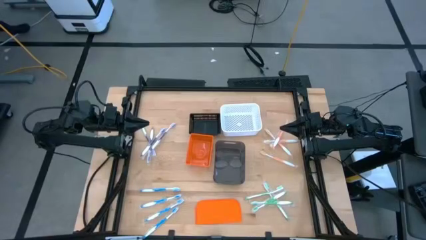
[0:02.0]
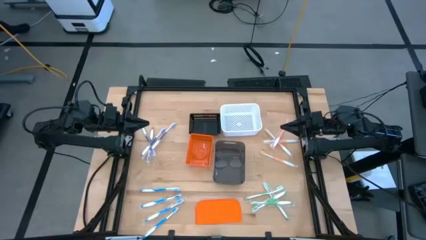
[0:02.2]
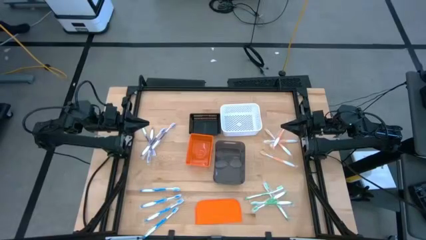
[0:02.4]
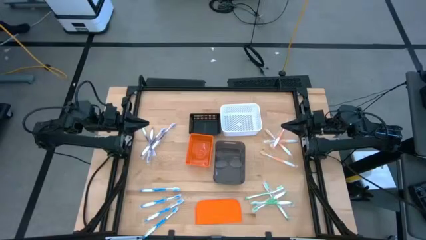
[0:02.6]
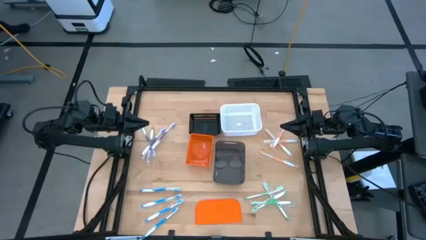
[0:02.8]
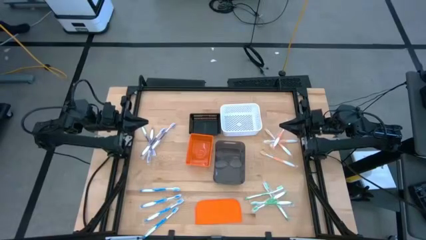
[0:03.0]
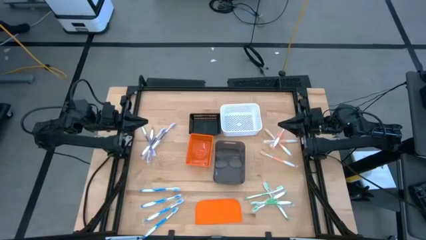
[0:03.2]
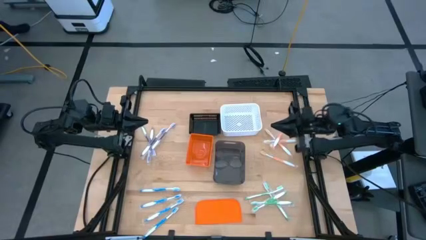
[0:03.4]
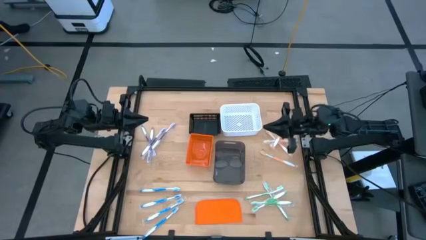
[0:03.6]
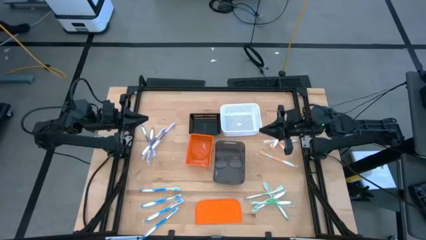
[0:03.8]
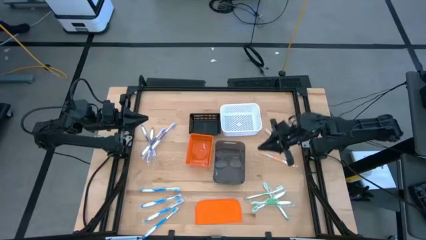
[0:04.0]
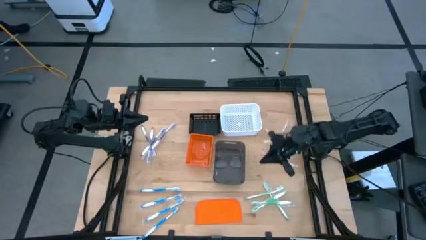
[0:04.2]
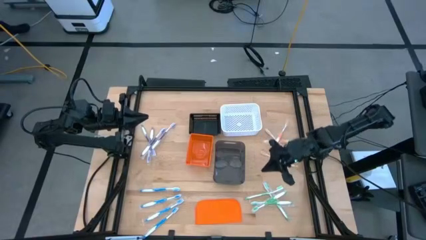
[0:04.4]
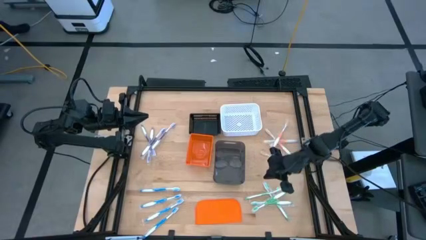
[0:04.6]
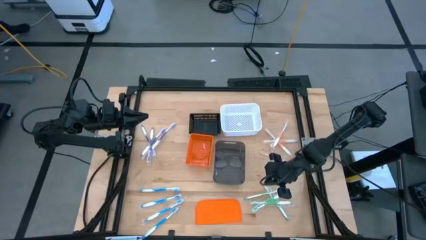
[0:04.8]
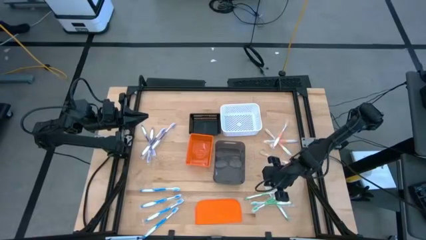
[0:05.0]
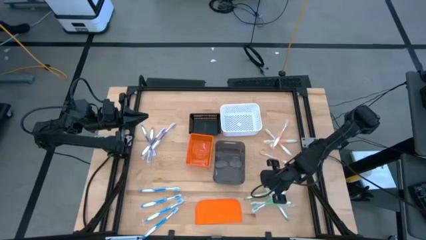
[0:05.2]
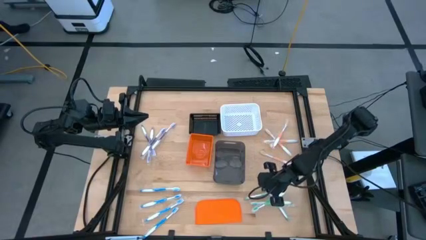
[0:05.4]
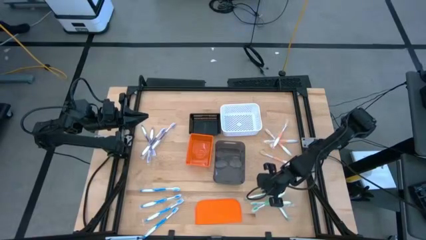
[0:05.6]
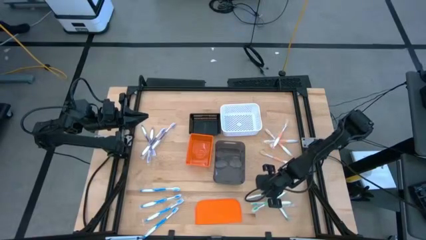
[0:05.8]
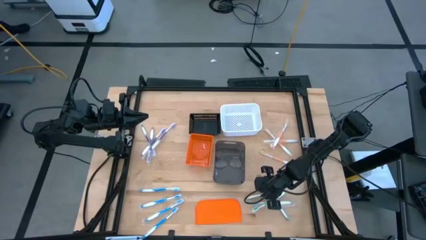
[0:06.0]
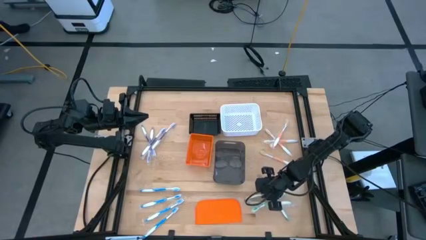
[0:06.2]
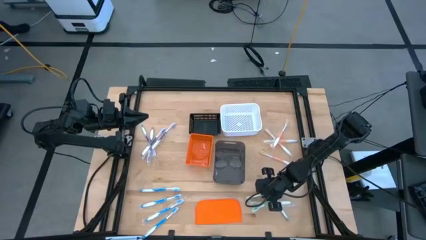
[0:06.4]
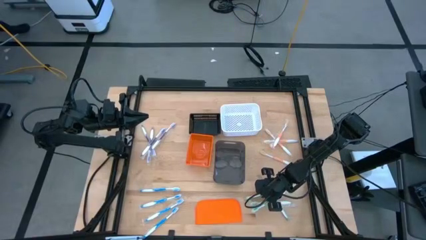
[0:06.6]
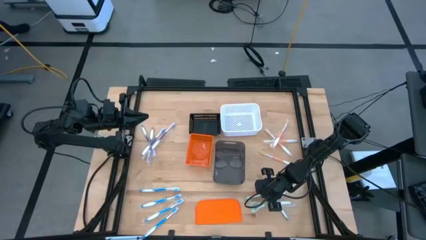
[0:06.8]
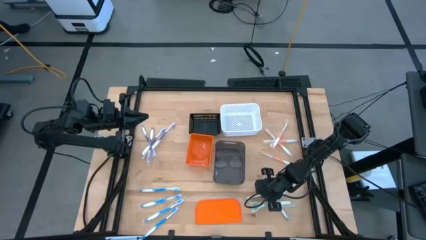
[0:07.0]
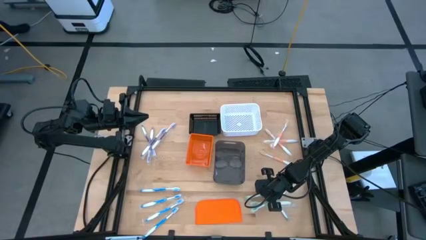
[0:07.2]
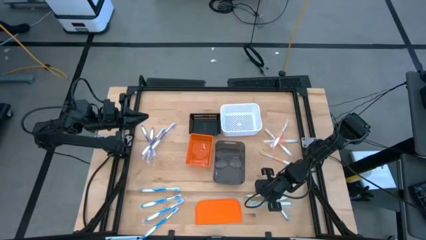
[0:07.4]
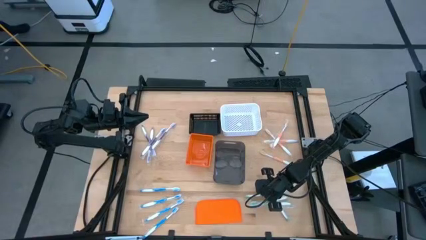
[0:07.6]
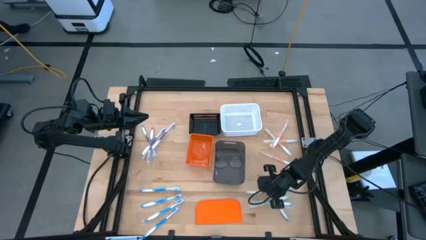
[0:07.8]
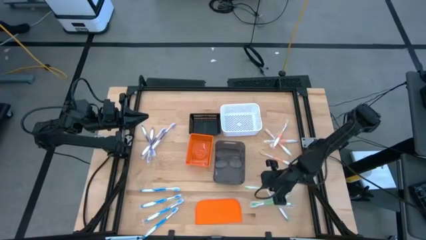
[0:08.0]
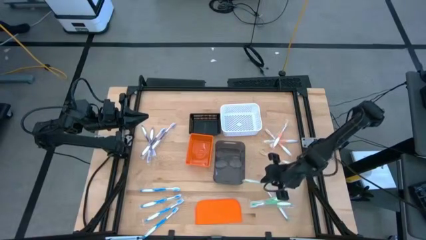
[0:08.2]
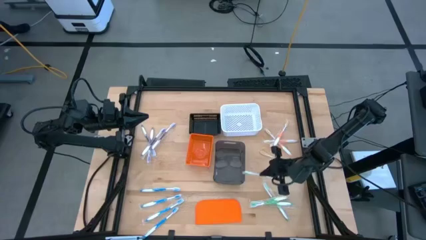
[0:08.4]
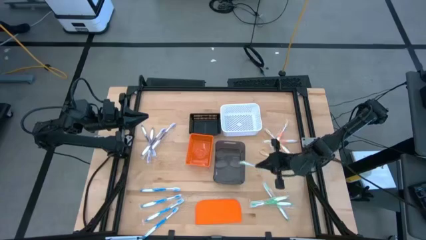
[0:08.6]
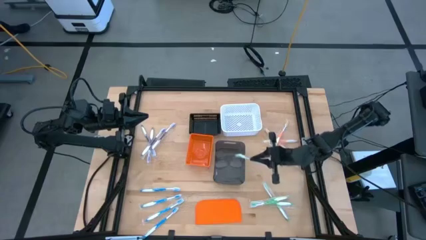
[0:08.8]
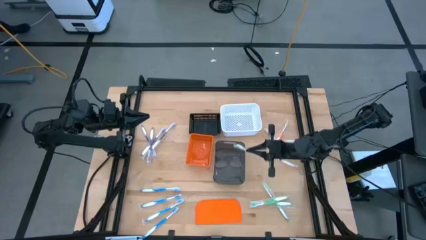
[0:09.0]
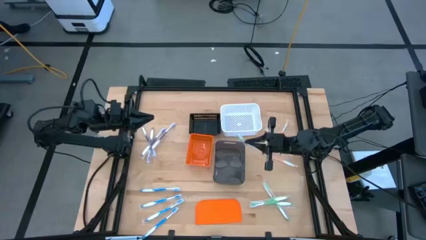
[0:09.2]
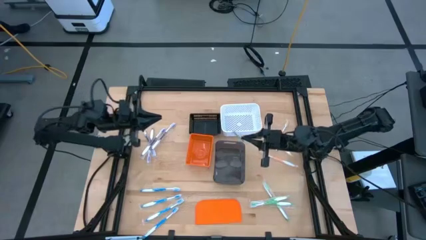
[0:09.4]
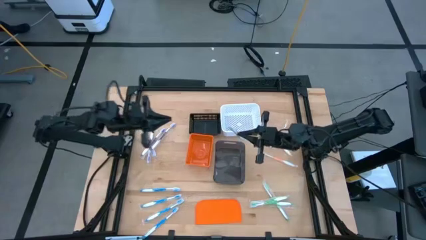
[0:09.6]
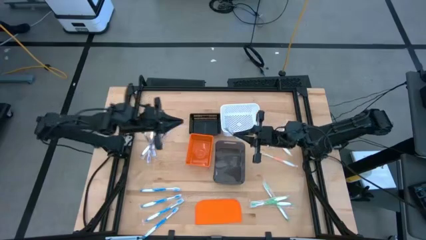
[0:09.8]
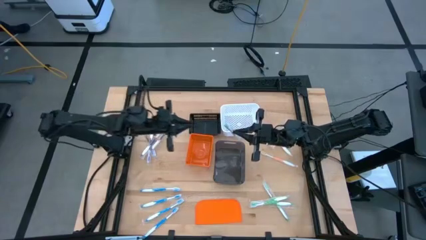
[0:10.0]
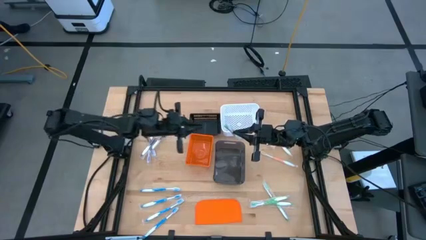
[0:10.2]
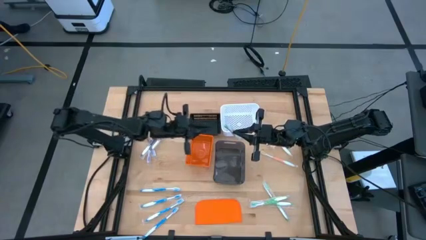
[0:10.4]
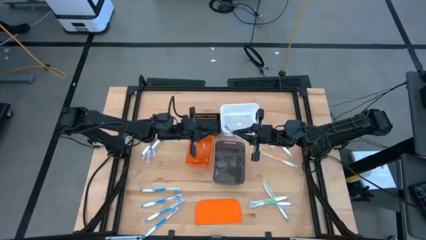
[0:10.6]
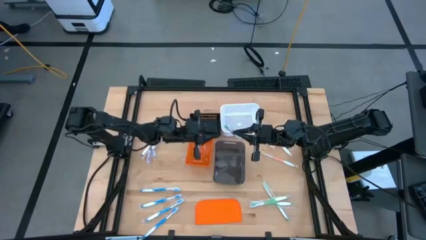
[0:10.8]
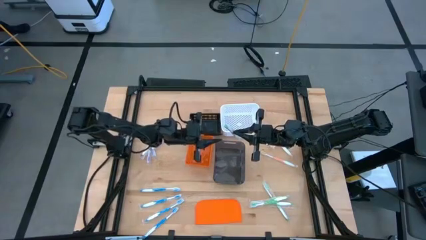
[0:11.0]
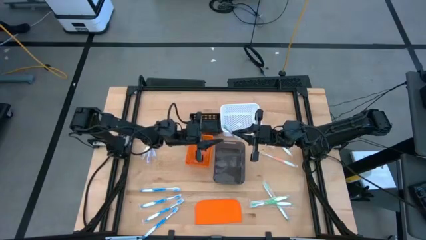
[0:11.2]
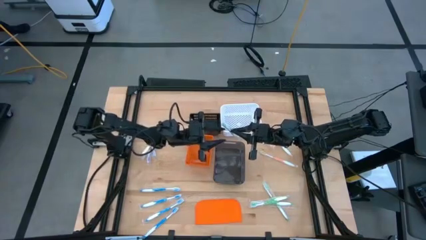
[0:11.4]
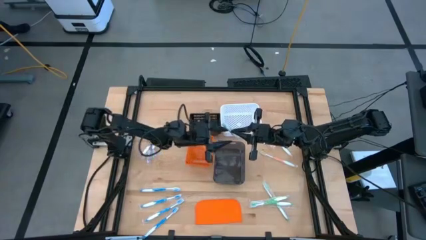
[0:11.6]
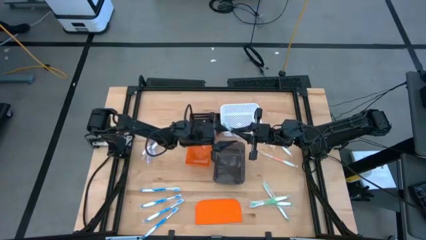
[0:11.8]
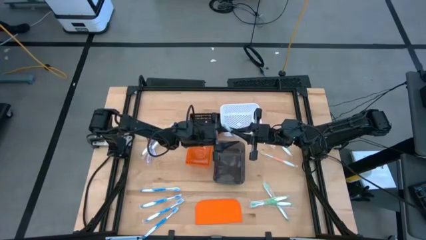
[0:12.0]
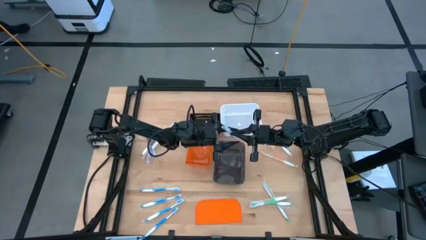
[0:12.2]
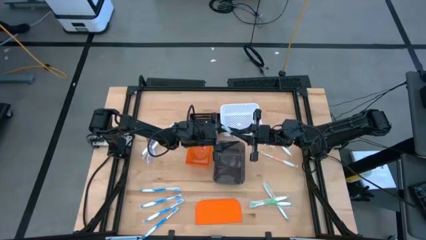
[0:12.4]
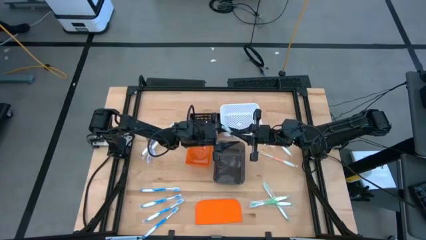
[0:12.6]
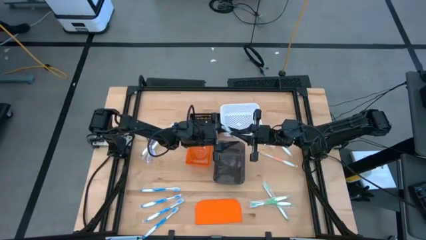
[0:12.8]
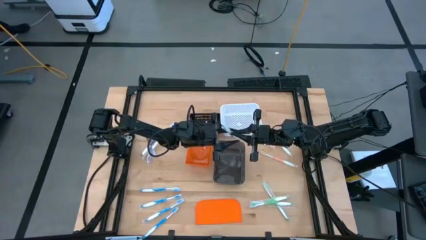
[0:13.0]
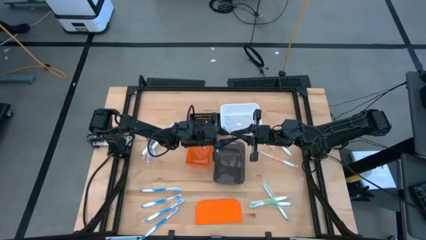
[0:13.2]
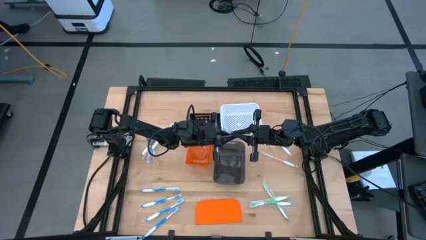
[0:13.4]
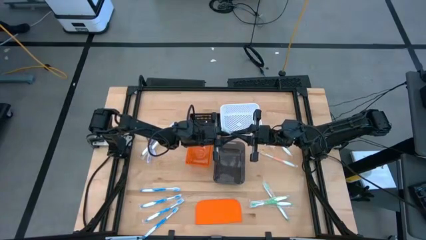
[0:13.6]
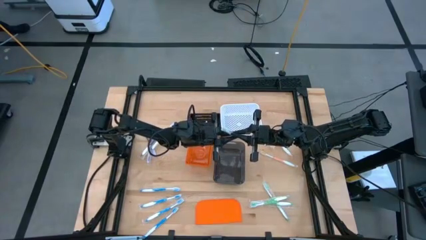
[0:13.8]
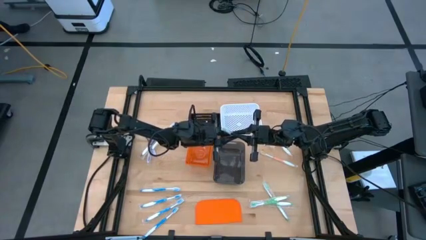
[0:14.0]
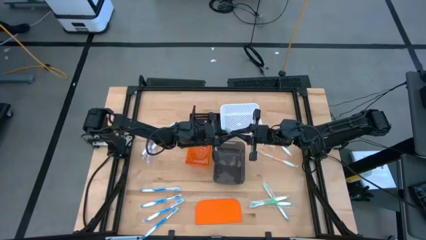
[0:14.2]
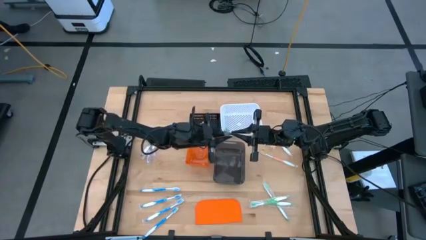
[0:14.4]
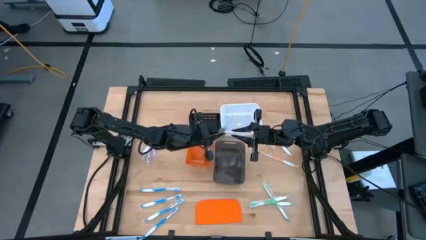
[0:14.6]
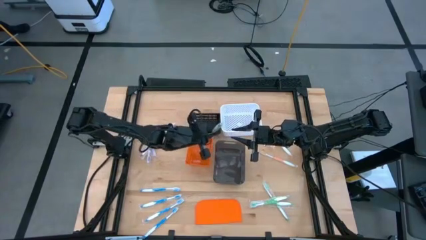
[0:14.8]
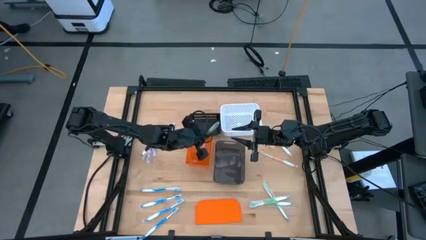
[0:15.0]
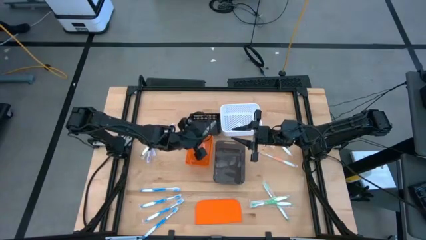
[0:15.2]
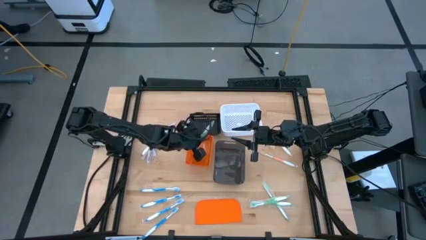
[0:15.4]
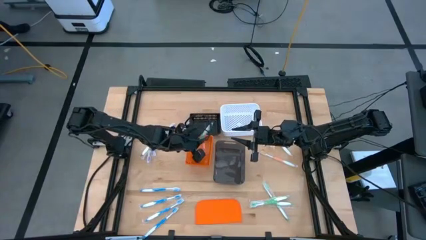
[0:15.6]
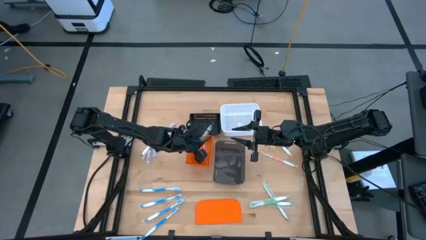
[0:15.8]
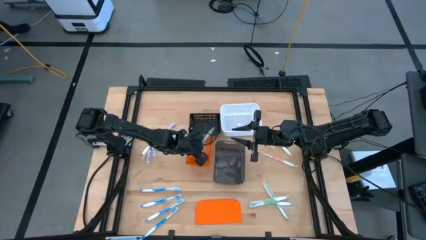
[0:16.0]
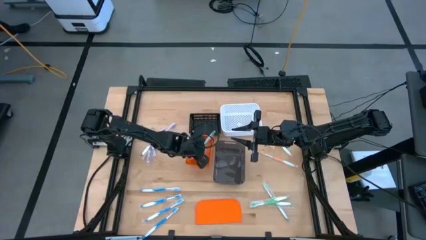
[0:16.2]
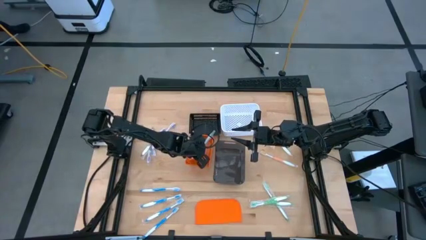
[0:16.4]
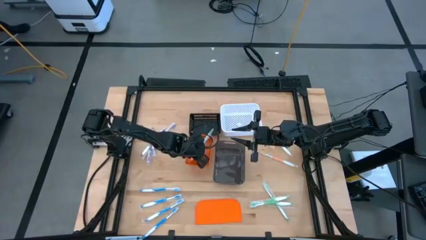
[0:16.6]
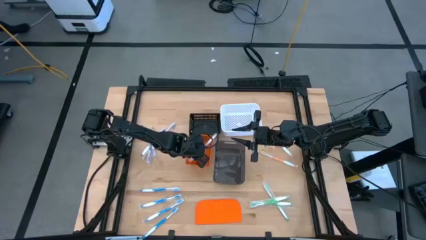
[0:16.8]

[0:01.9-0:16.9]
Task: Pick & Place Toothbrushes
Put the green toothbrush into the orange bin
